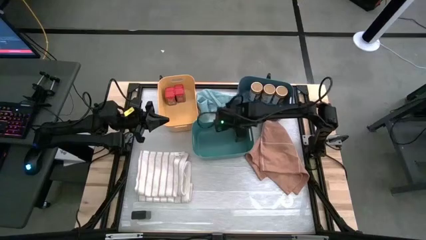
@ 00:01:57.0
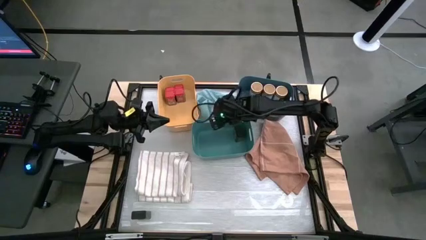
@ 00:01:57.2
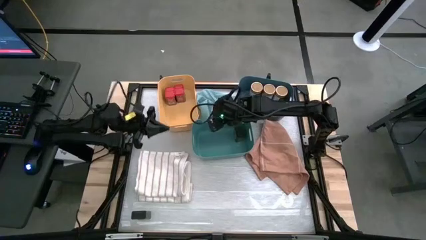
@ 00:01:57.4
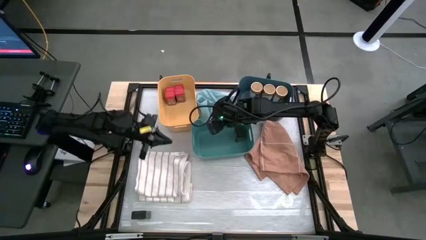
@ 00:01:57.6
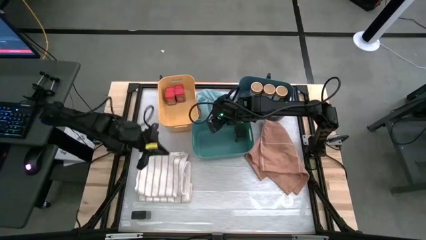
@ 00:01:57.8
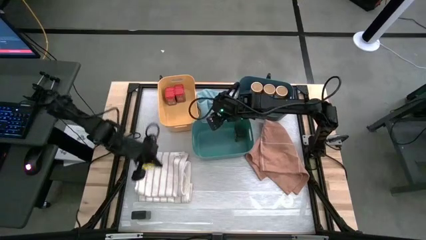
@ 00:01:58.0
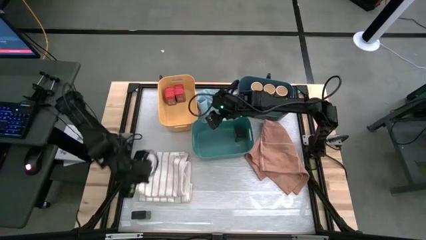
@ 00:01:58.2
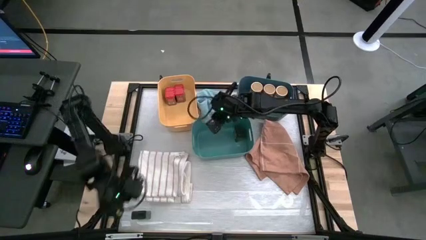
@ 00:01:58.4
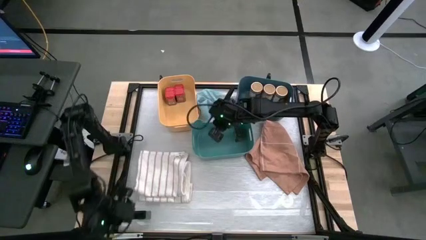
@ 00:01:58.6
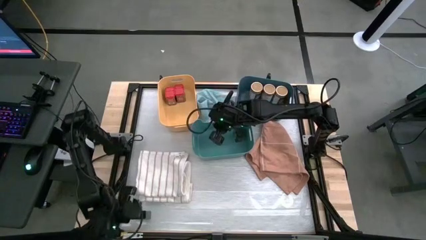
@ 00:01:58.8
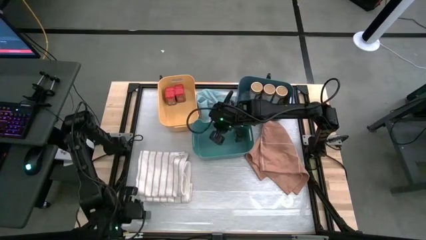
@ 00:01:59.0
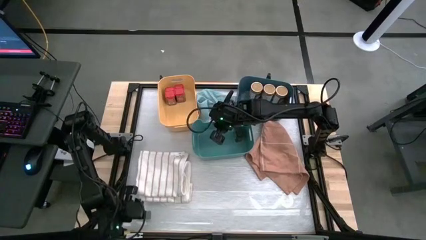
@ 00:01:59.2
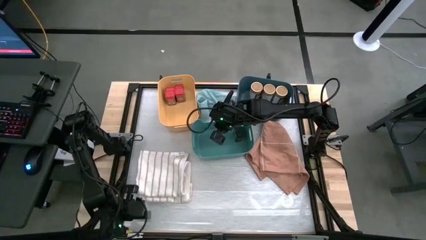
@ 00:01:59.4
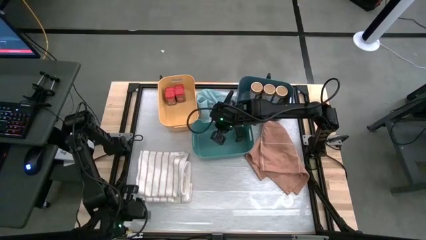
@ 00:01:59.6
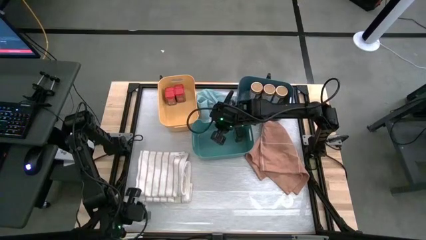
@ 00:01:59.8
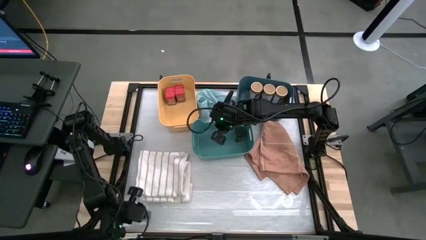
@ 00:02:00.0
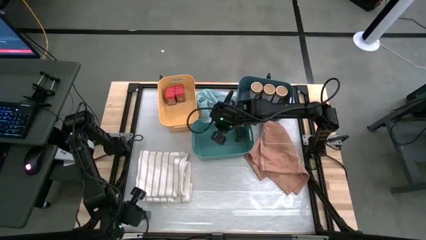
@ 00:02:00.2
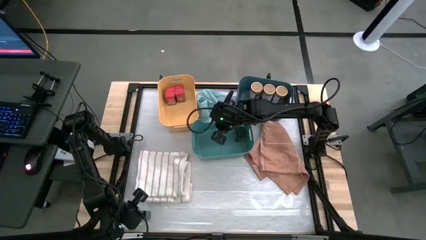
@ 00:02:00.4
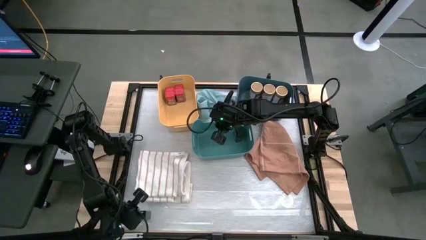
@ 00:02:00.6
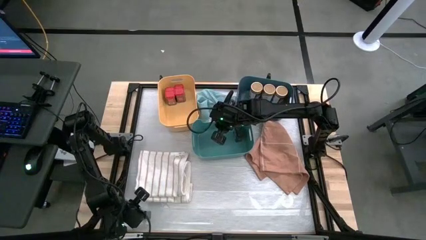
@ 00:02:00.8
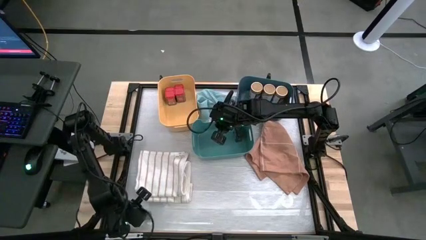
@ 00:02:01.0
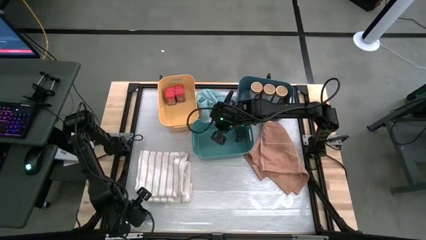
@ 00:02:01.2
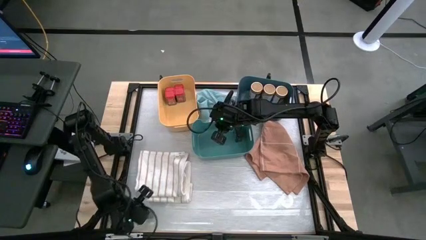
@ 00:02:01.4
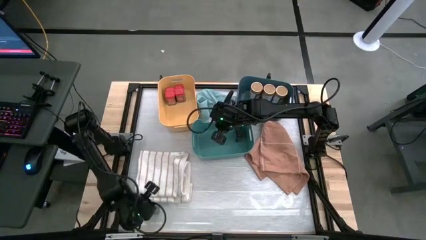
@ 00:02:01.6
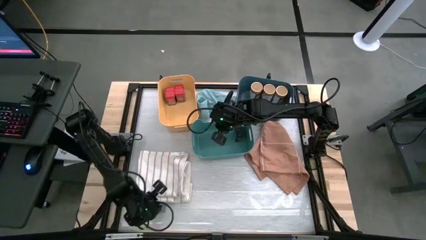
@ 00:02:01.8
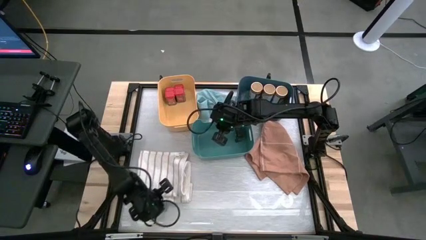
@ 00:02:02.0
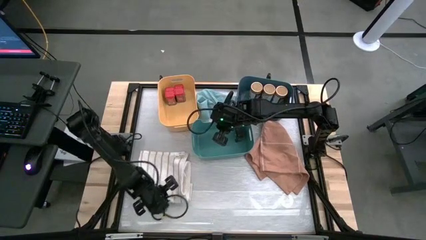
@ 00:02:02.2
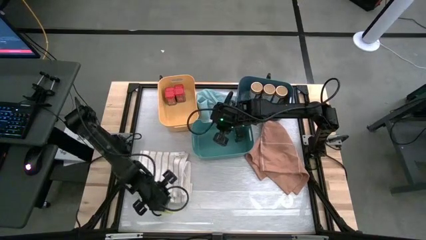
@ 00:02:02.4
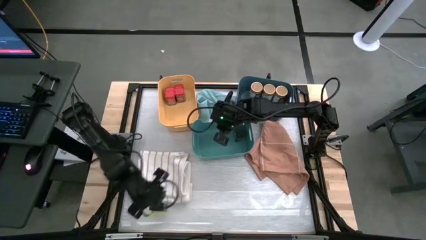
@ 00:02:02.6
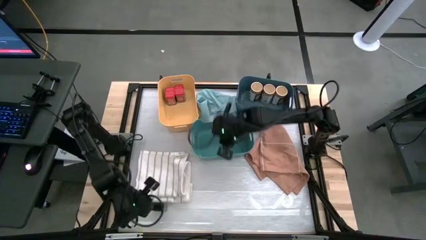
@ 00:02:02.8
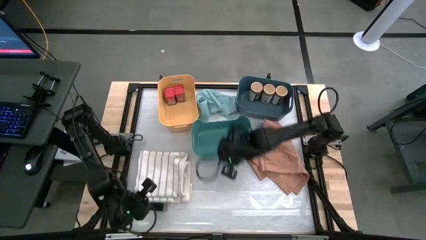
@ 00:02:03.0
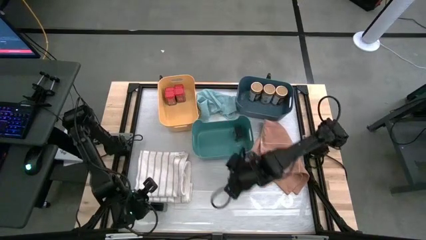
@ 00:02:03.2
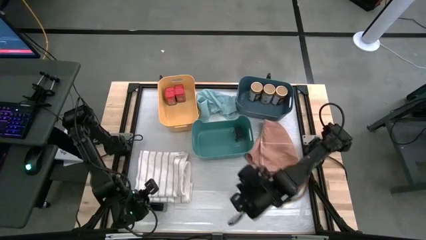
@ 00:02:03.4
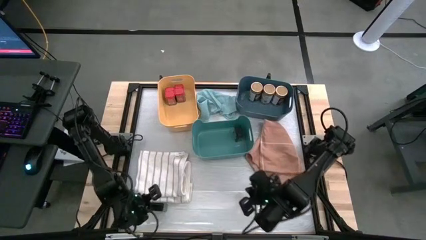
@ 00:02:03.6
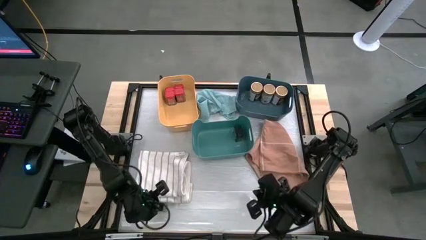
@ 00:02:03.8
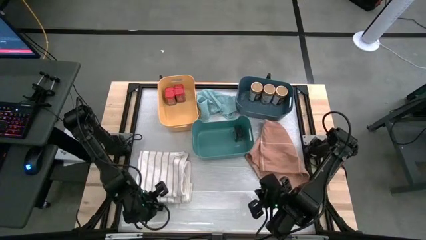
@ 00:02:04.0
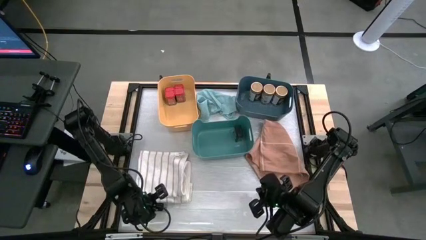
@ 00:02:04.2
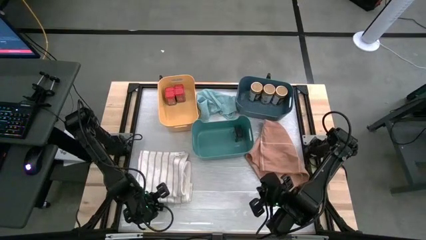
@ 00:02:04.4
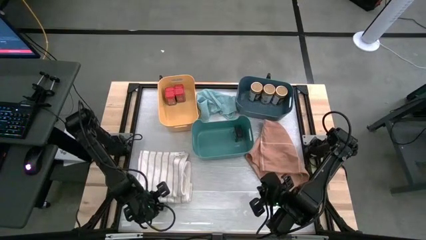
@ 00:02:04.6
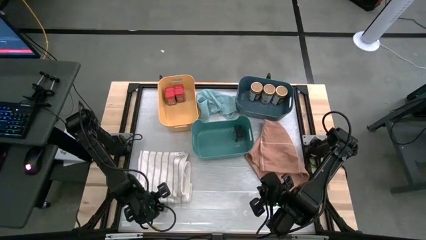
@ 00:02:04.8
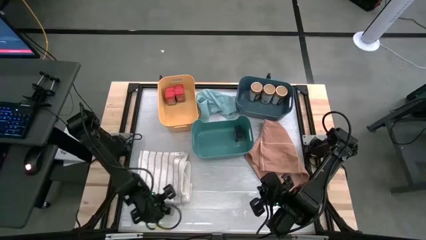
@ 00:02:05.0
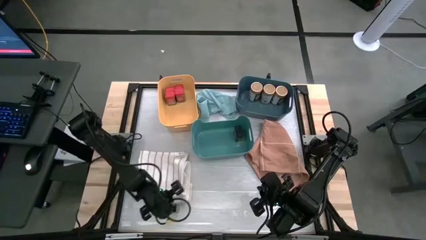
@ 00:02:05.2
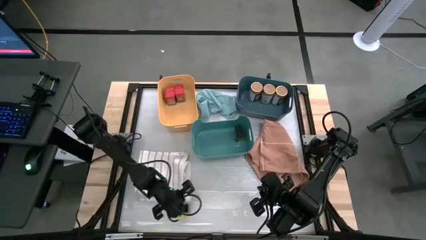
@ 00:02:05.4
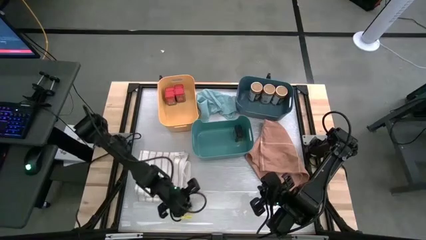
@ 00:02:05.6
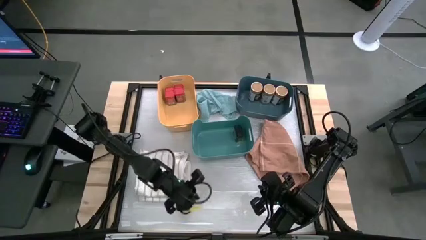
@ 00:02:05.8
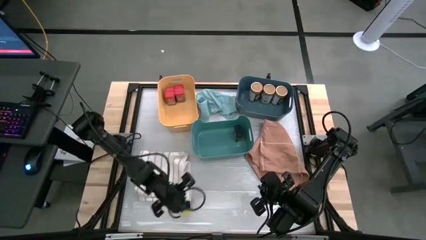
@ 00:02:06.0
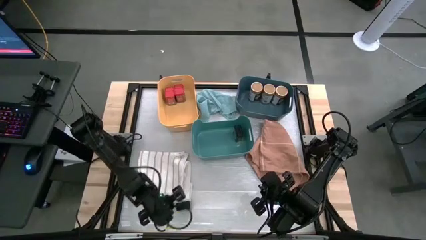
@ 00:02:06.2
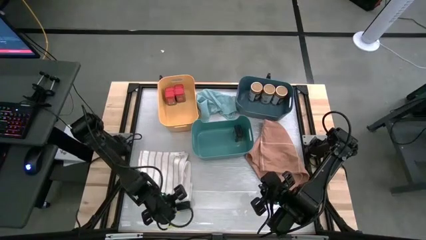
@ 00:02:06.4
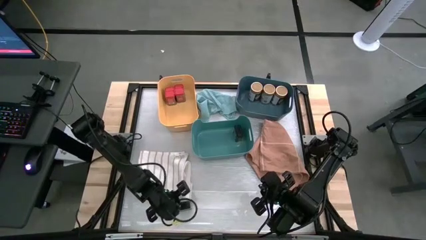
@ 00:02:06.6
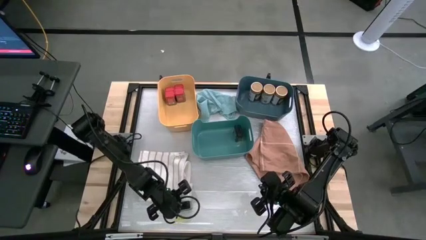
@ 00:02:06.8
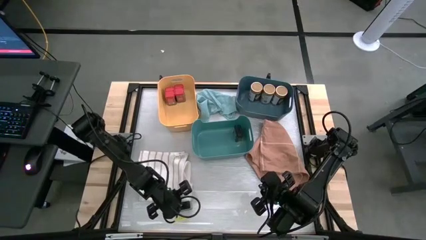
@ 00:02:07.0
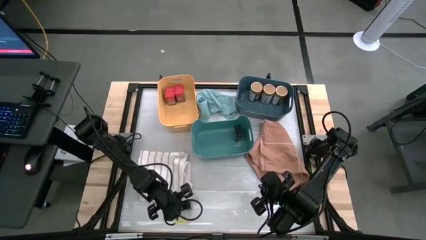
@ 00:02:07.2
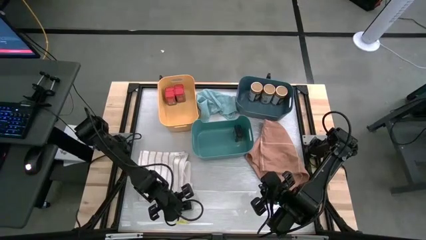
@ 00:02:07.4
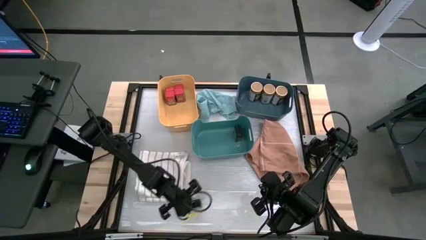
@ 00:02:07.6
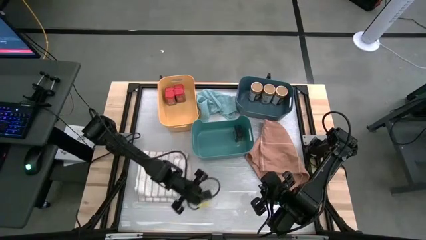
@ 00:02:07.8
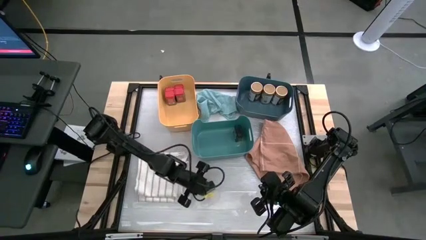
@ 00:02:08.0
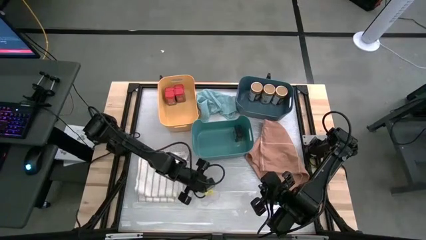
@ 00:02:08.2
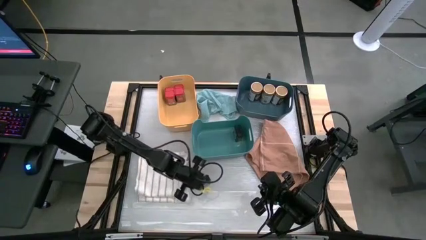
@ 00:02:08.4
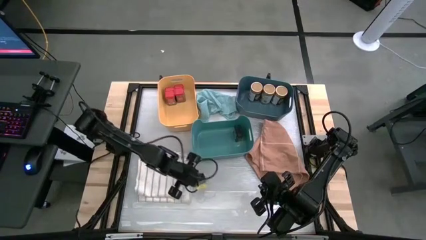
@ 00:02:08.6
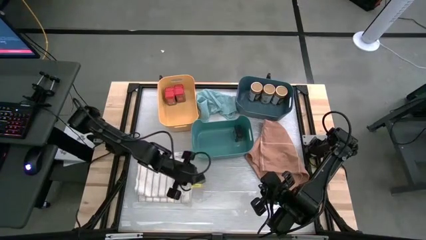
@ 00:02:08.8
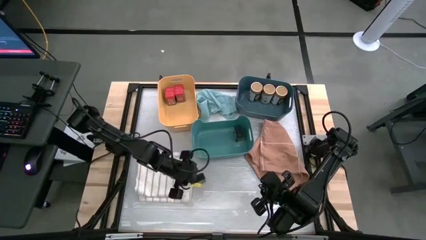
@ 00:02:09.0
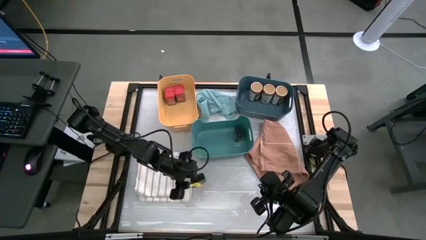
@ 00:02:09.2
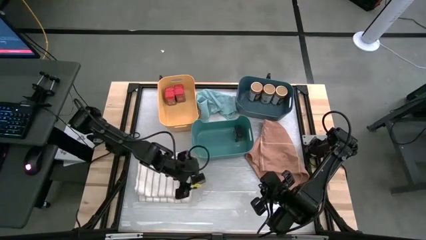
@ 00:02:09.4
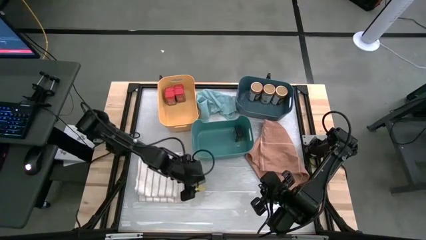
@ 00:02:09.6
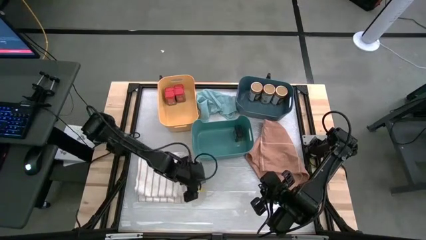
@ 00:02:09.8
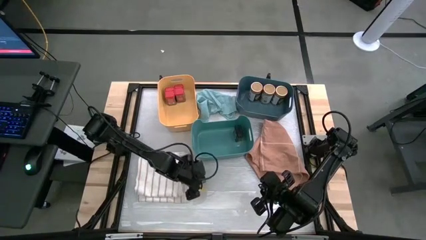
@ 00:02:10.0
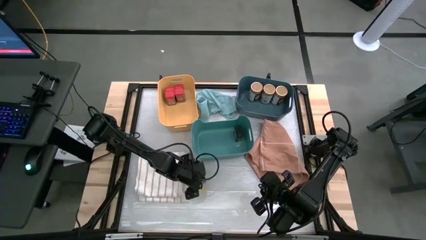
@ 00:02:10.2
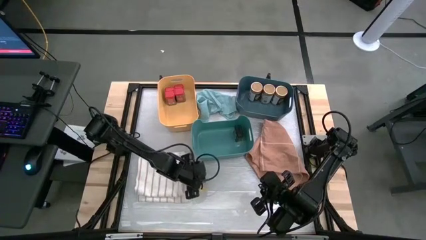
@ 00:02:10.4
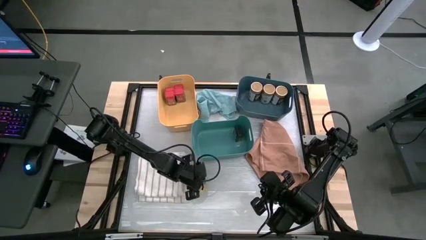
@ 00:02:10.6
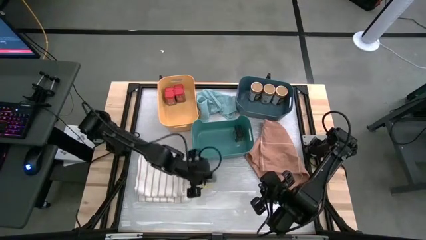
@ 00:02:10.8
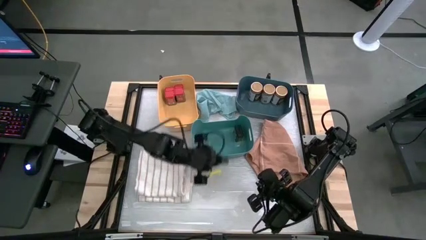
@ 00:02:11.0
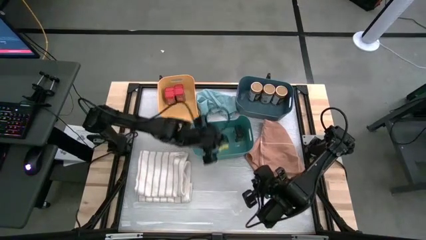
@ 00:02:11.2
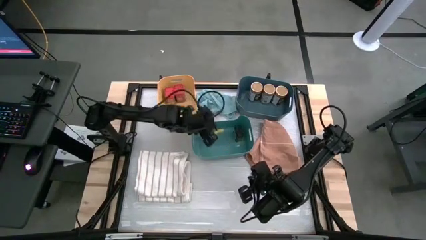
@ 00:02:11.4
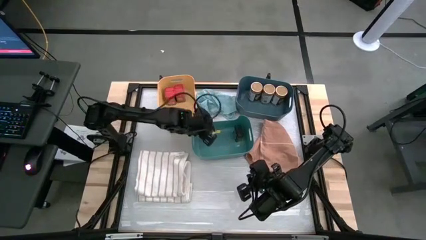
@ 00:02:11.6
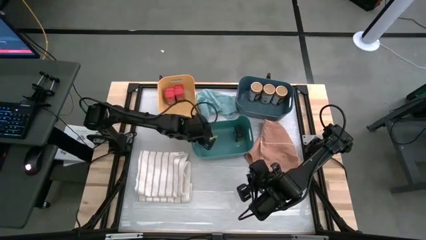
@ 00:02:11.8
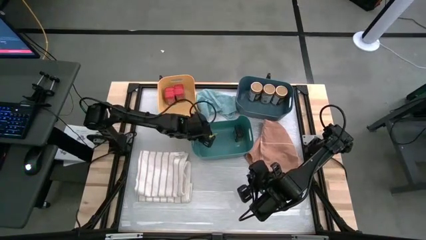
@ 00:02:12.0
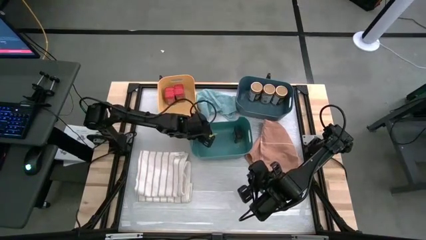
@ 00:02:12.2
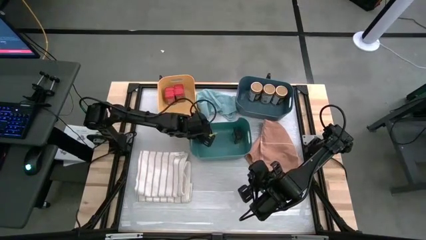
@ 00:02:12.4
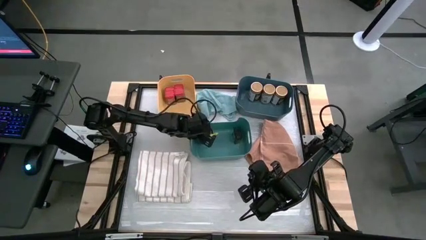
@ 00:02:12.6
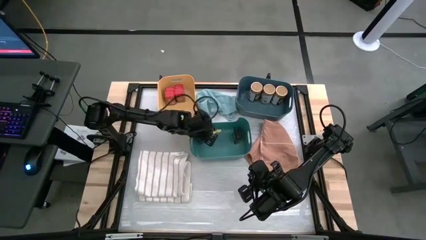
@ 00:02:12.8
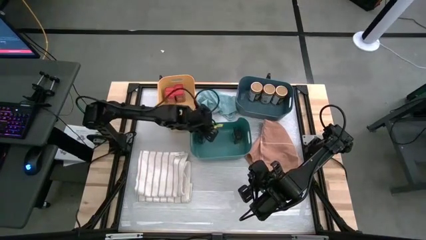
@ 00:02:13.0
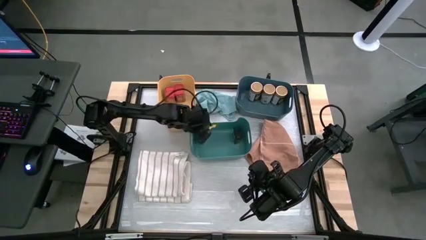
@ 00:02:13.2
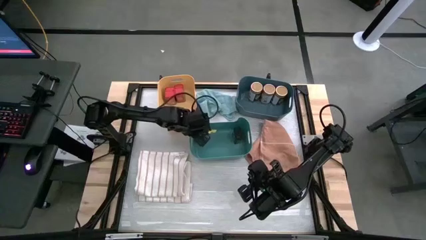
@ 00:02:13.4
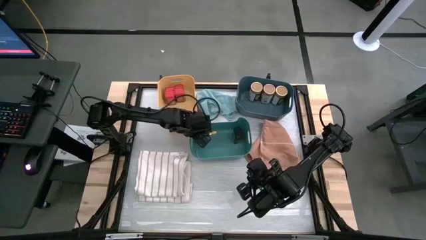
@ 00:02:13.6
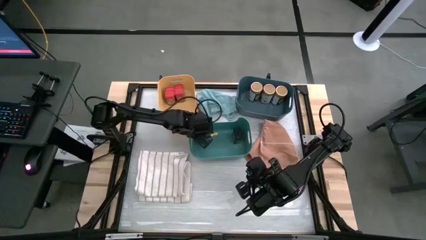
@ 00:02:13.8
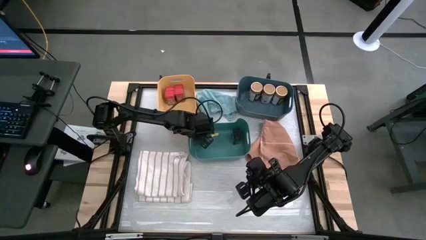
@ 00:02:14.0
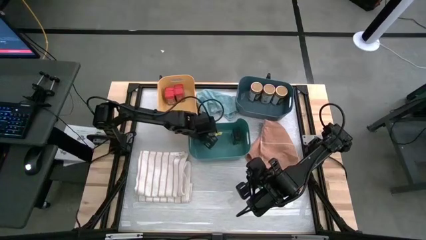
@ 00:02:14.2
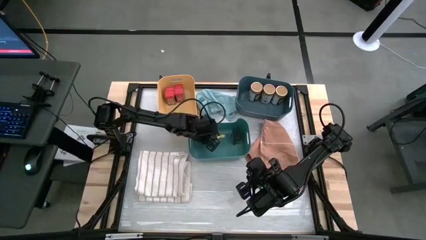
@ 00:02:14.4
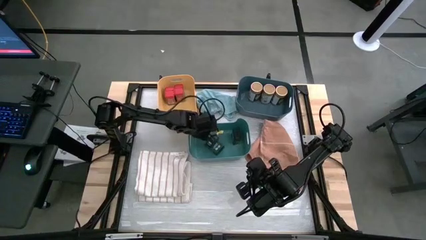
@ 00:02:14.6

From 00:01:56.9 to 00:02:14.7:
Task: Sort spices by type
Put the green seasoning can into the green bin
